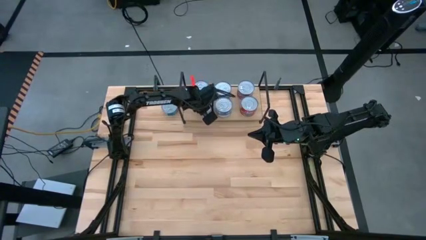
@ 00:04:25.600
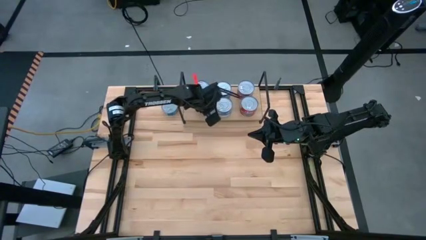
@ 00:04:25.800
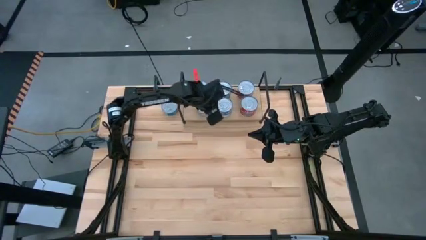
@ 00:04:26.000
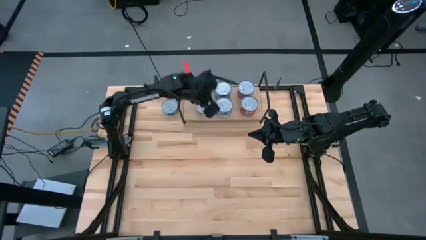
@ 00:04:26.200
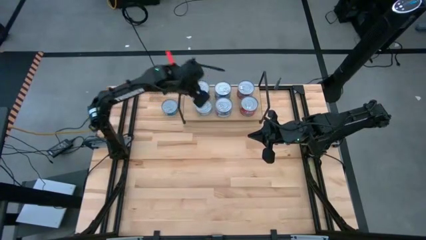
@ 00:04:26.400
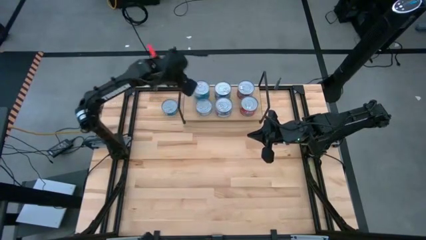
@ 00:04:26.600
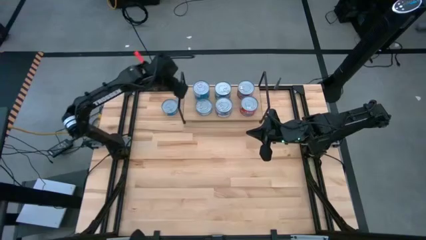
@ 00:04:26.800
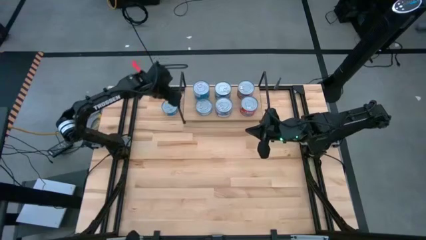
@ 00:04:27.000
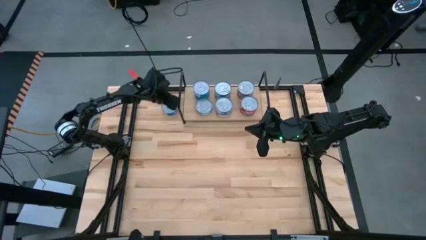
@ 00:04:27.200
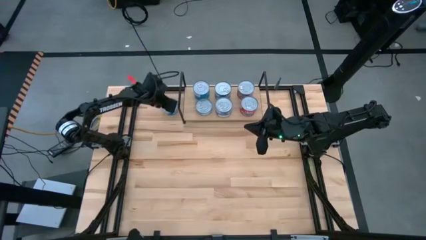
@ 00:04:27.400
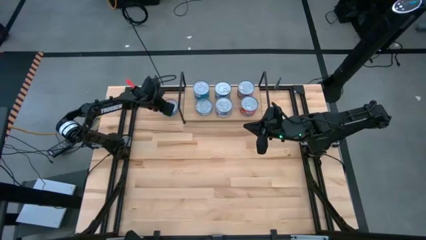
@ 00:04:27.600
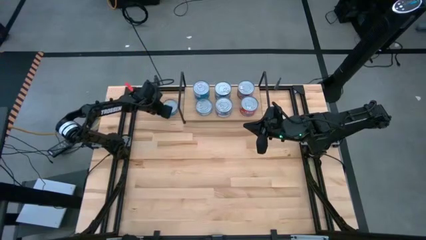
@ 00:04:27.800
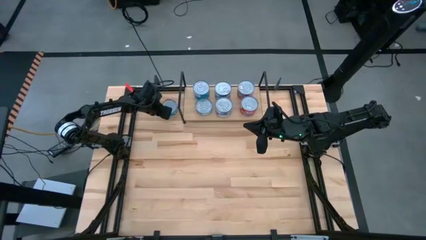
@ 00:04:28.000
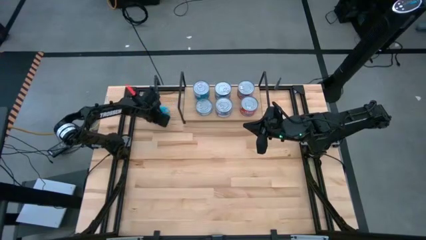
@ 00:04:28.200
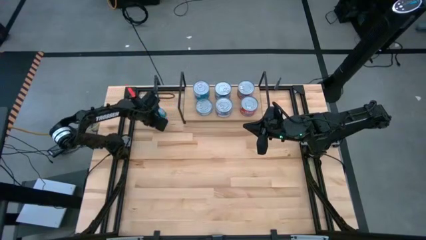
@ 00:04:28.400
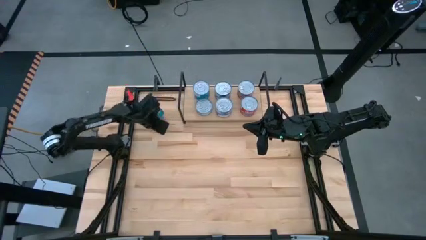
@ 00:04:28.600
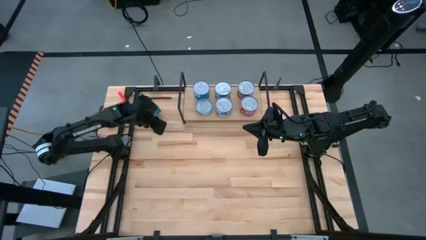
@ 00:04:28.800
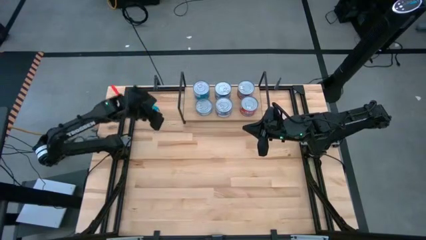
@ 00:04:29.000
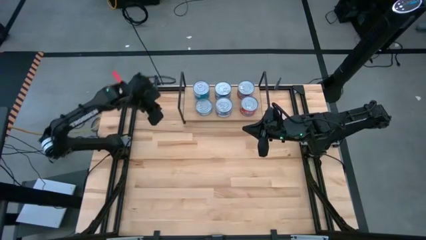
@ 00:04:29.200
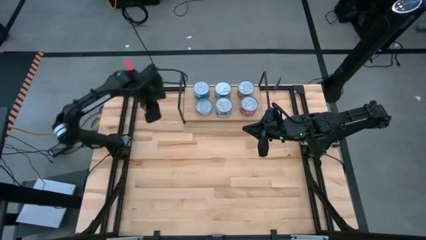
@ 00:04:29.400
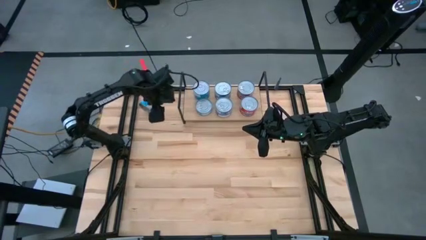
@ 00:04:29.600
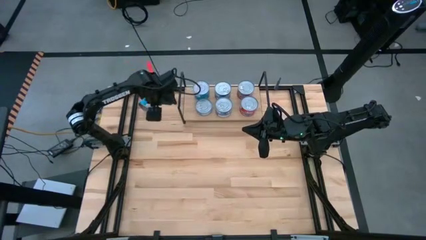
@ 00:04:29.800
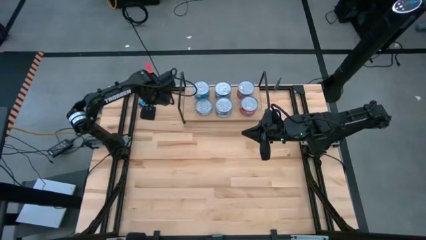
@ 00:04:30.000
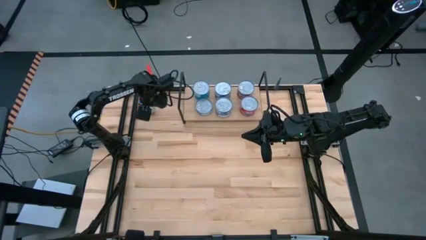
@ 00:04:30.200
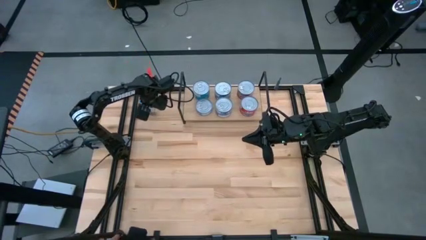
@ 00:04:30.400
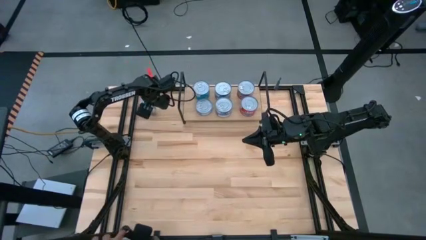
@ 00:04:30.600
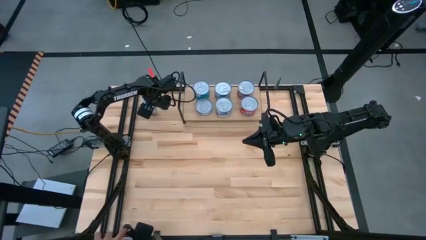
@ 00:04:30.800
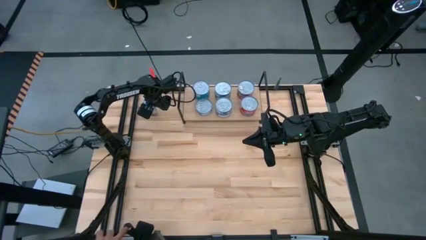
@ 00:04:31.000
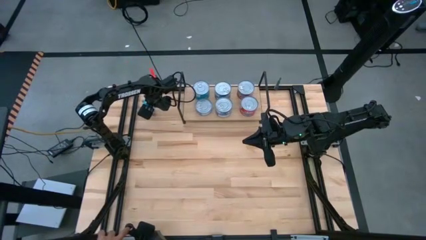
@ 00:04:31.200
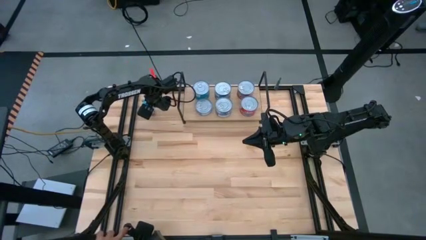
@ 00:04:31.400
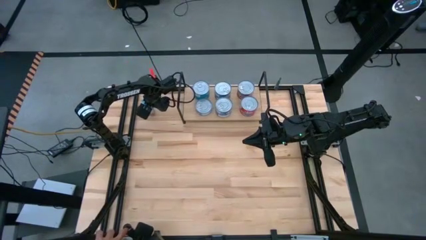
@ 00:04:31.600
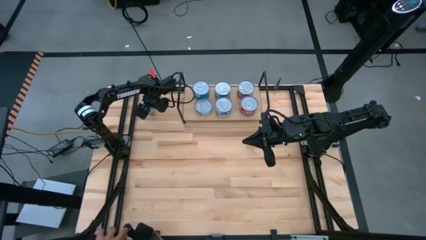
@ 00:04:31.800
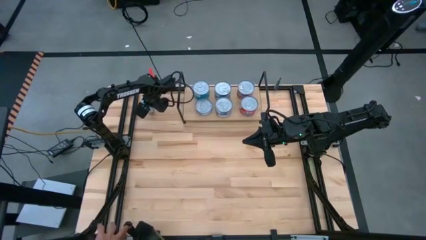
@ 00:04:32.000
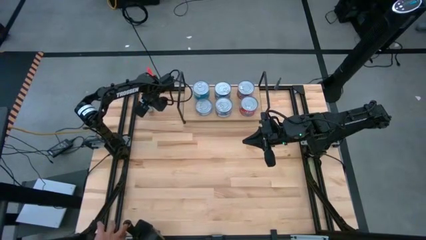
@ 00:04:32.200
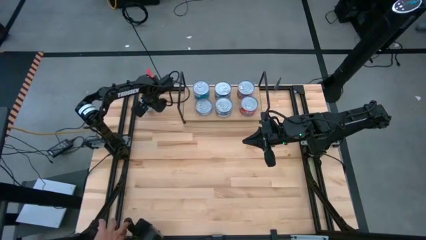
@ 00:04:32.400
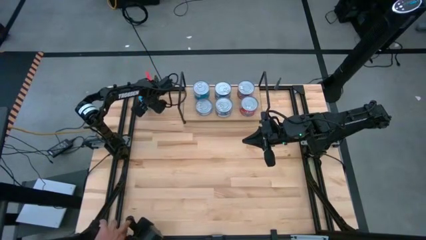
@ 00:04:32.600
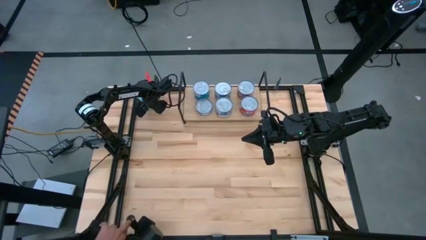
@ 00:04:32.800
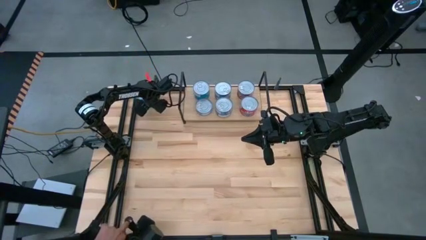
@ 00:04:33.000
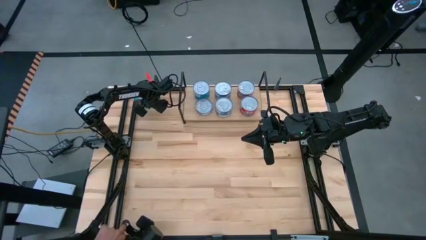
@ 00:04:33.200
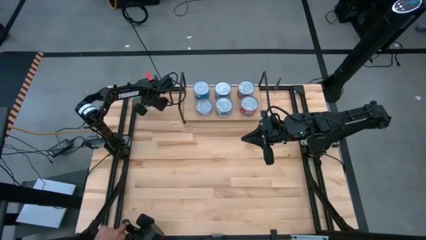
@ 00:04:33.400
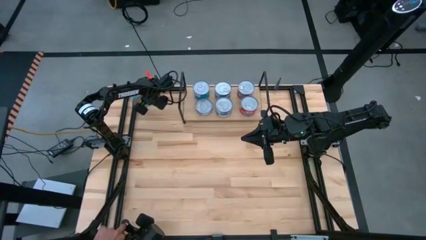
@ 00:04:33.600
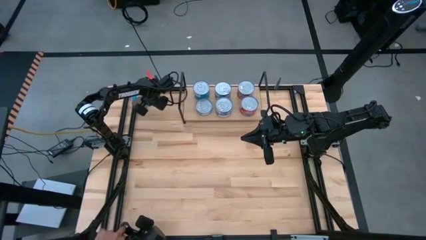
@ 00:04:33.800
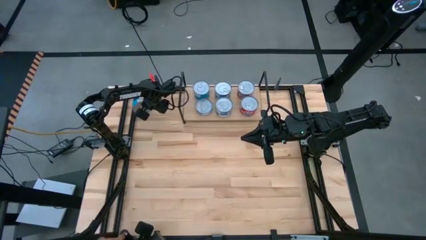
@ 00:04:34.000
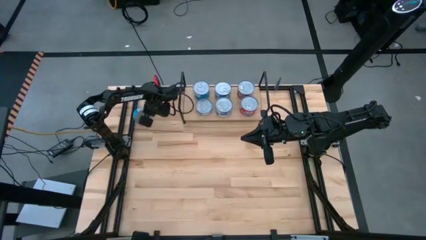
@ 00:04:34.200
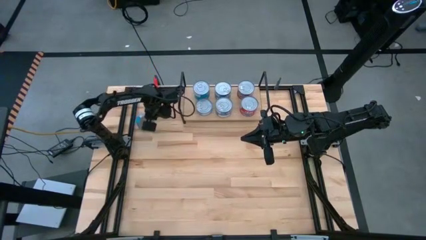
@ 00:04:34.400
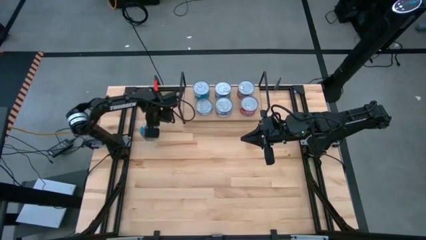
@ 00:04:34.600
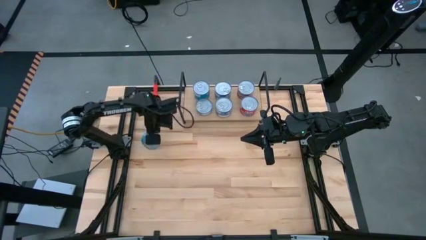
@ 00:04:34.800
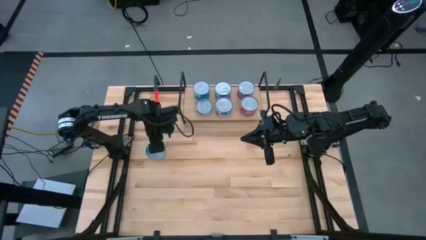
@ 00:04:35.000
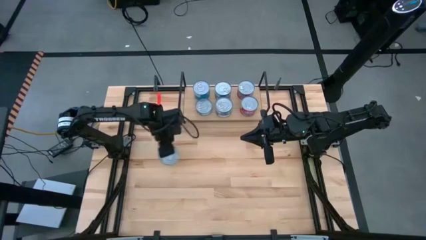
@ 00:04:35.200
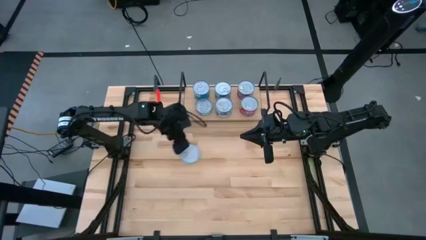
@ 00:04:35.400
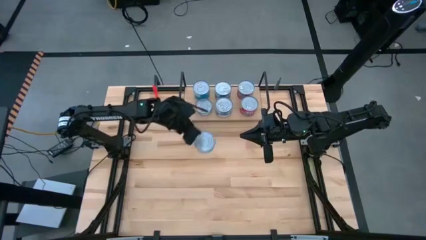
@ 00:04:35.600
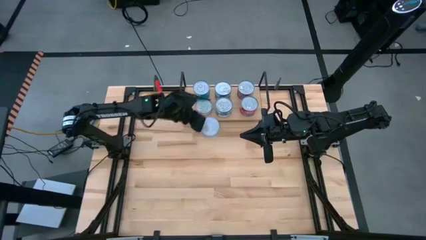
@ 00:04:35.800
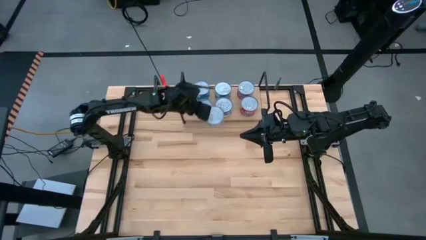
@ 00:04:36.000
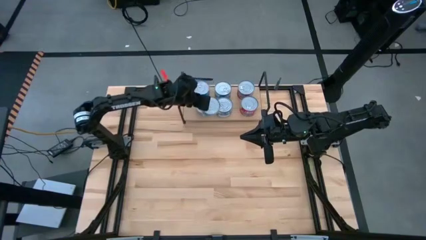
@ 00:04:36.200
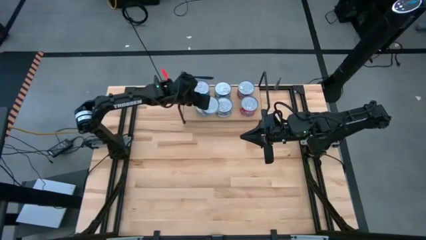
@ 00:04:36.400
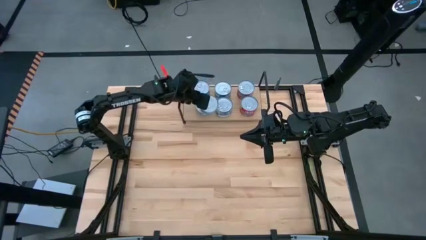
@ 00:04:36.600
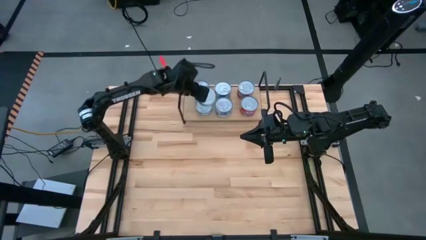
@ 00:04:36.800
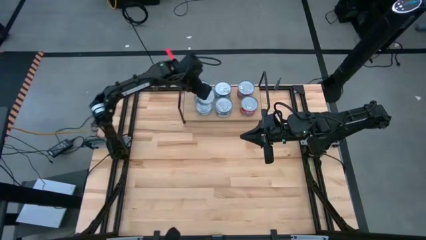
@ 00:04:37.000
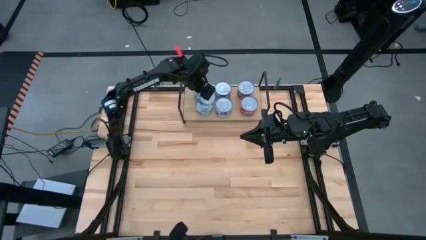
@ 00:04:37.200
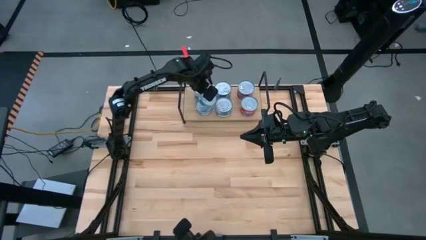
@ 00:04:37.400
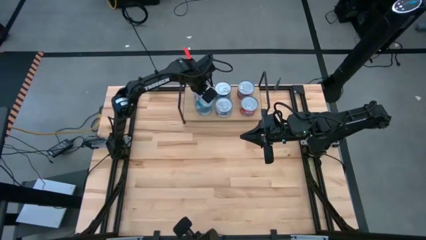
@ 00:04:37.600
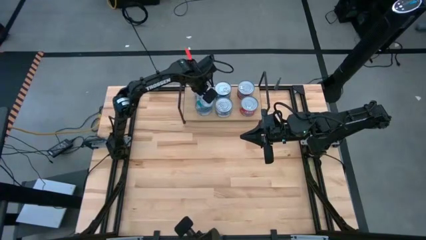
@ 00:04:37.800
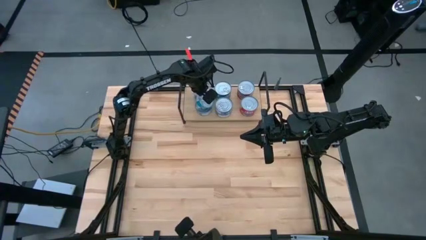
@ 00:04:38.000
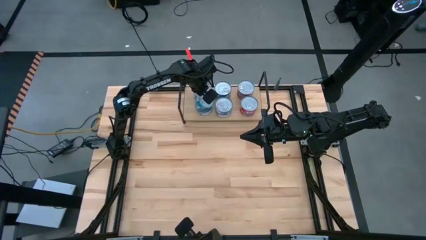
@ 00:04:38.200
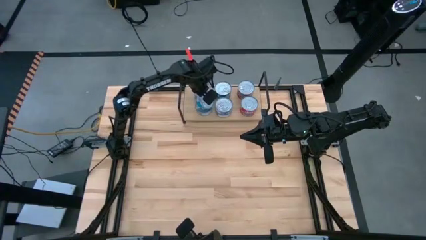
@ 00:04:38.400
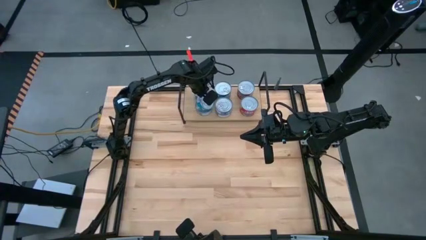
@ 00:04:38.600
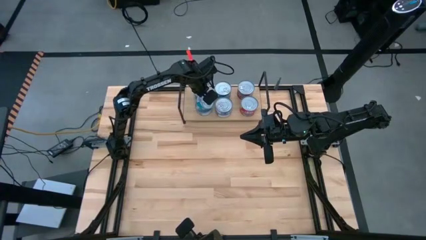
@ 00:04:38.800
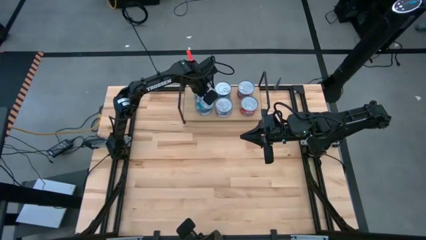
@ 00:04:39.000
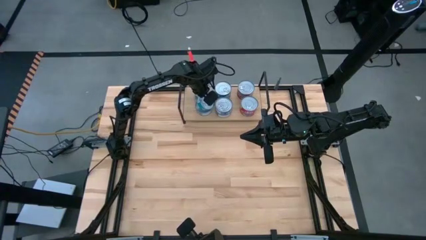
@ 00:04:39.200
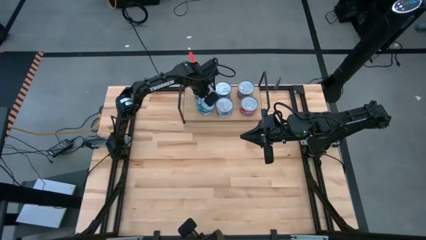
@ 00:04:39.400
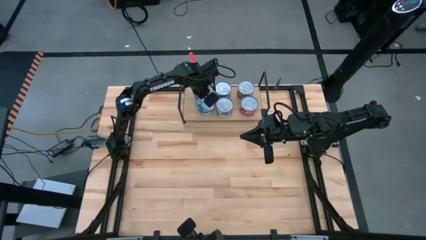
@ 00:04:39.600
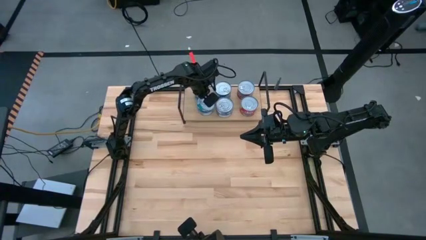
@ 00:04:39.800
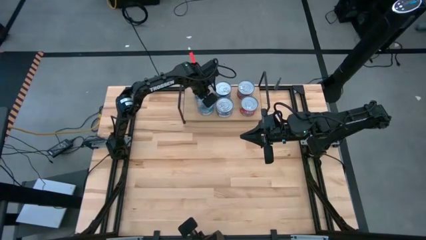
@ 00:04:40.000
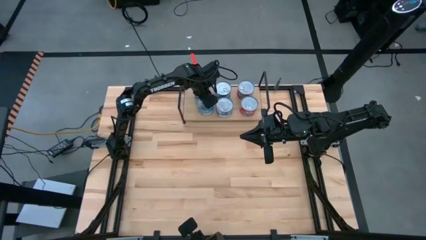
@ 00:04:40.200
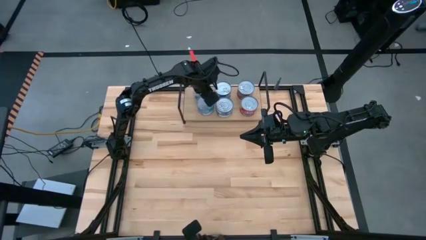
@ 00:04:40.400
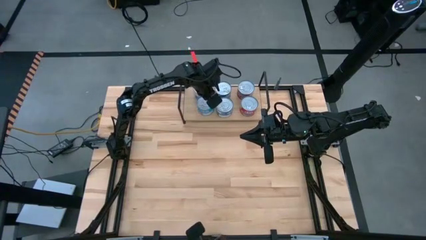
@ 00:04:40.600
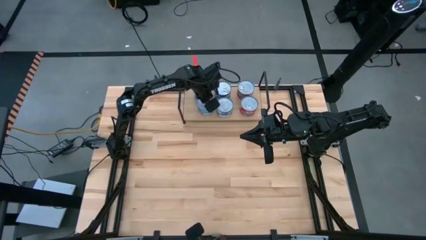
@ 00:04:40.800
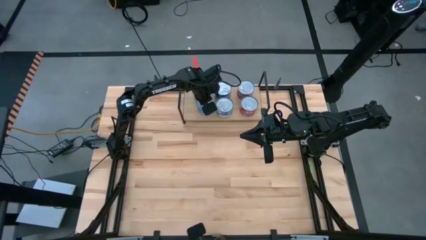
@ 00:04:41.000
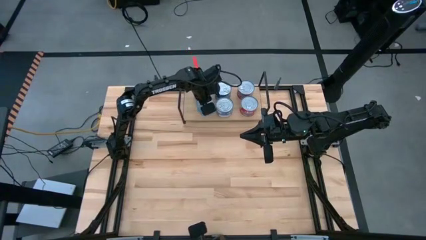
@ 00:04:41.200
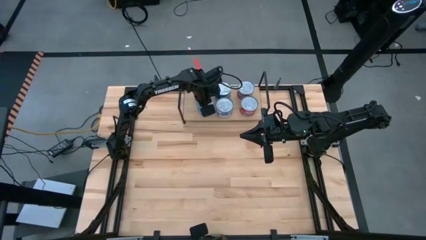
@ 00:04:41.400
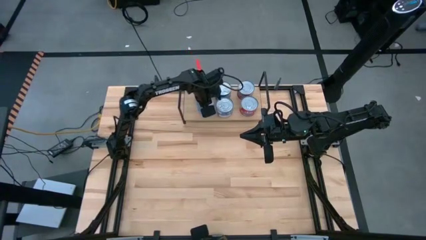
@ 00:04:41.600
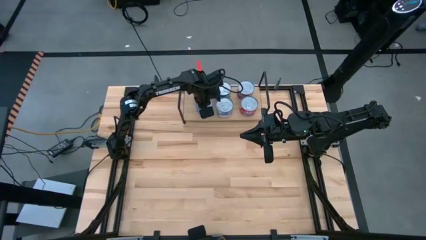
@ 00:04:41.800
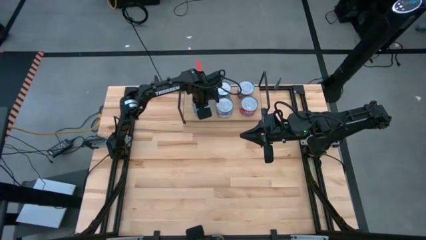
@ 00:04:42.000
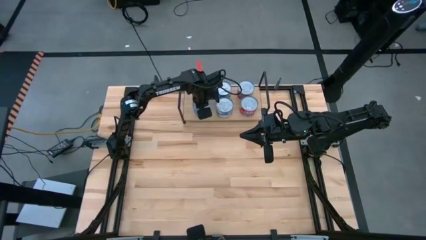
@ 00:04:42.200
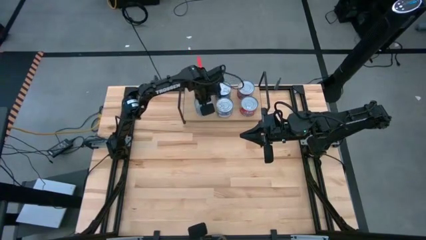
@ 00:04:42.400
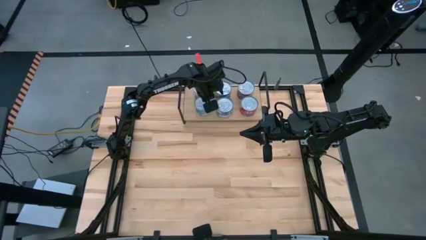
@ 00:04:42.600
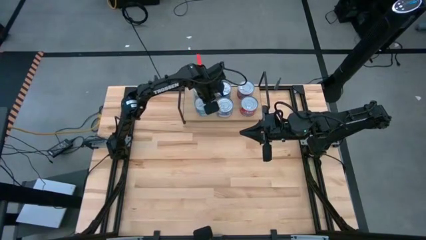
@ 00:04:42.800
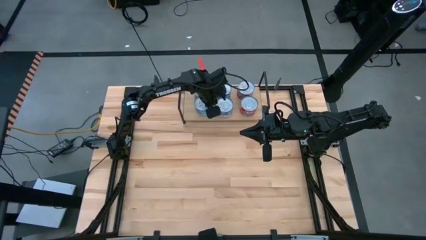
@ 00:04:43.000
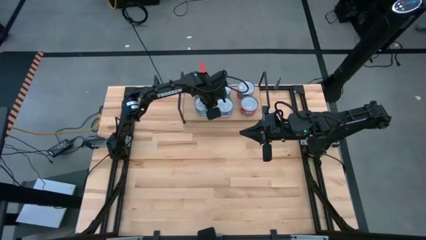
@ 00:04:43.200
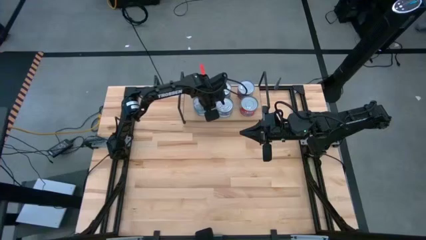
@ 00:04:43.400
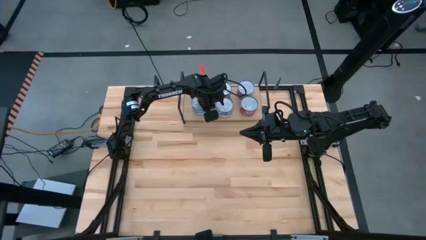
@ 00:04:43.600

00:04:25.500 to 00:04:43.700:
Task: Stack canned seafood by type on shelf
Stack the yellow-blue tuna can on top of the yellow-blue tuna can on the shelf
